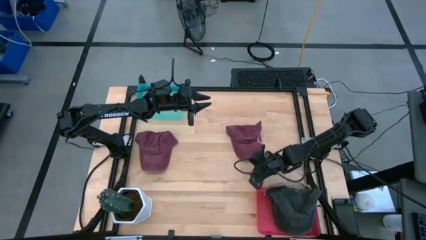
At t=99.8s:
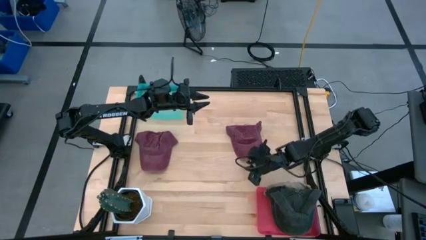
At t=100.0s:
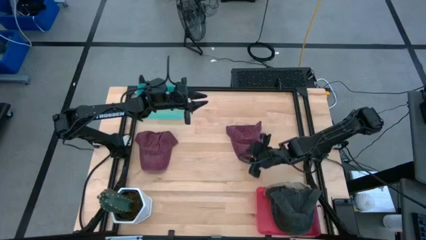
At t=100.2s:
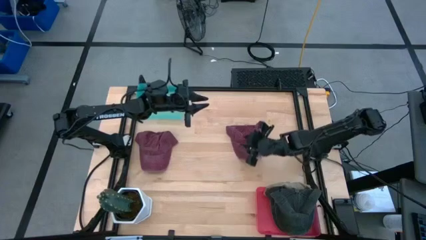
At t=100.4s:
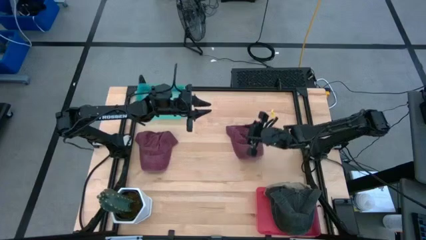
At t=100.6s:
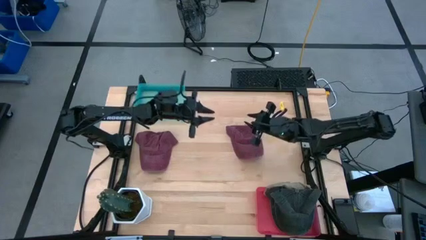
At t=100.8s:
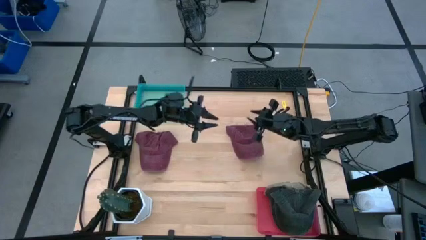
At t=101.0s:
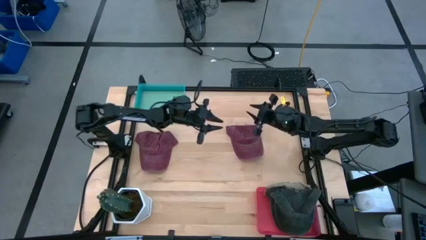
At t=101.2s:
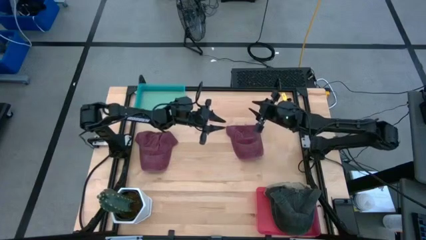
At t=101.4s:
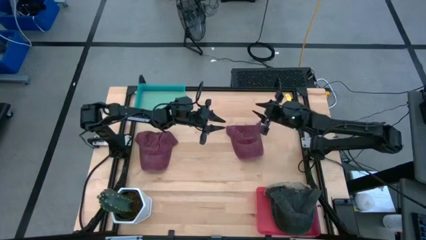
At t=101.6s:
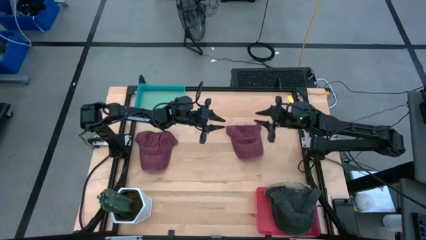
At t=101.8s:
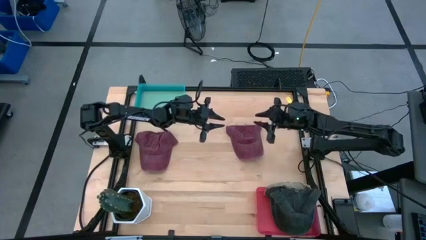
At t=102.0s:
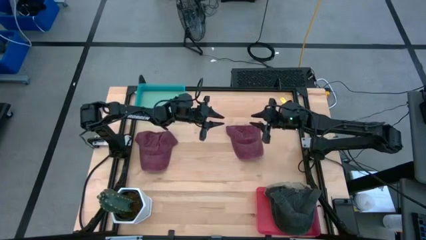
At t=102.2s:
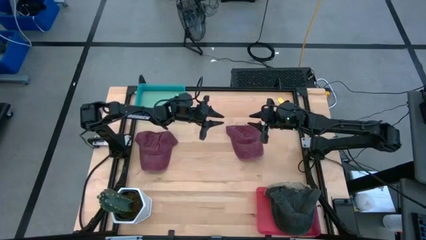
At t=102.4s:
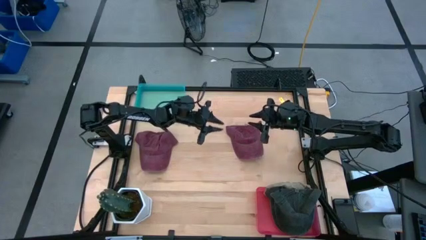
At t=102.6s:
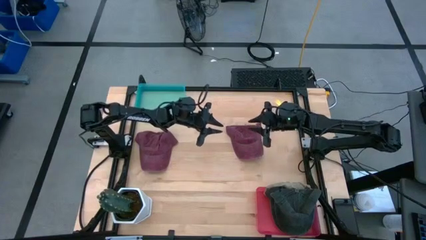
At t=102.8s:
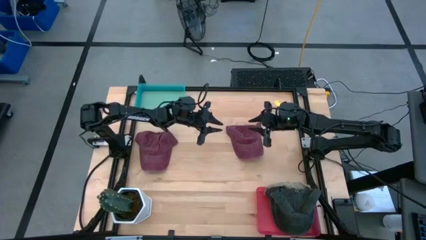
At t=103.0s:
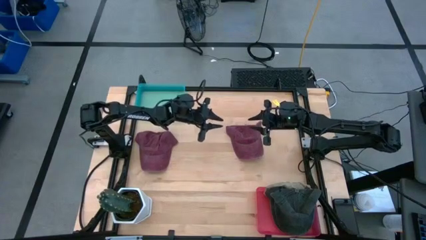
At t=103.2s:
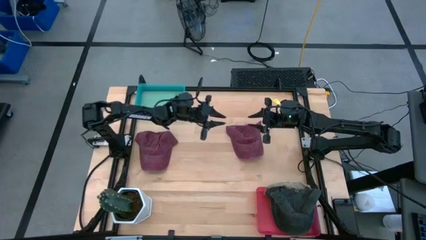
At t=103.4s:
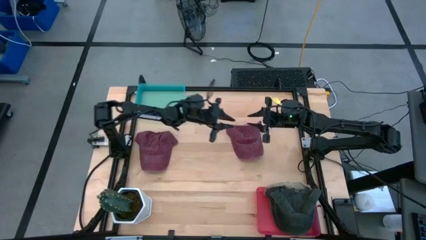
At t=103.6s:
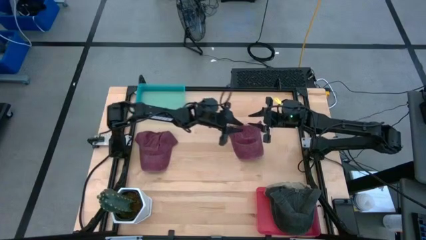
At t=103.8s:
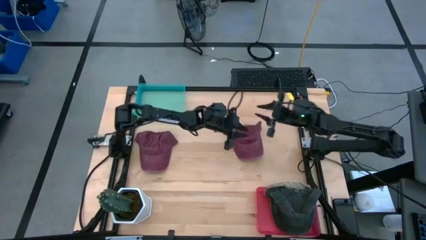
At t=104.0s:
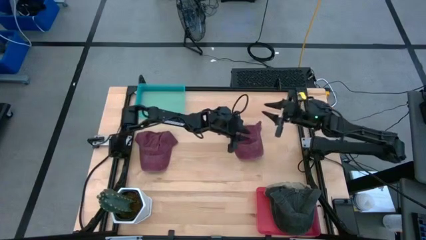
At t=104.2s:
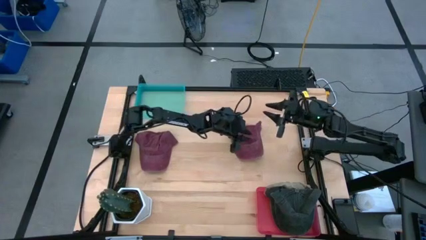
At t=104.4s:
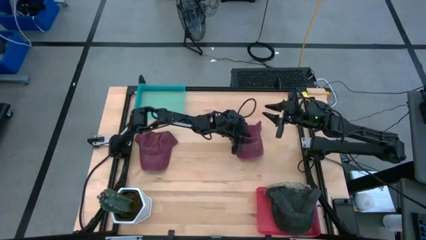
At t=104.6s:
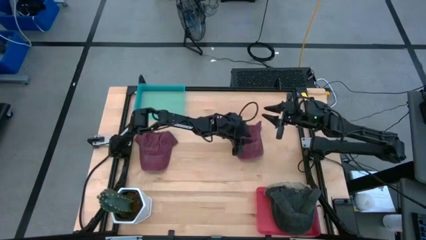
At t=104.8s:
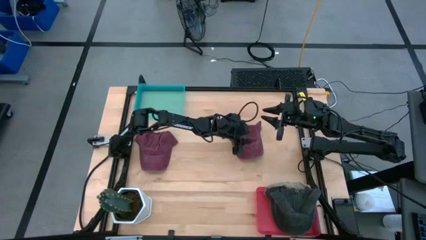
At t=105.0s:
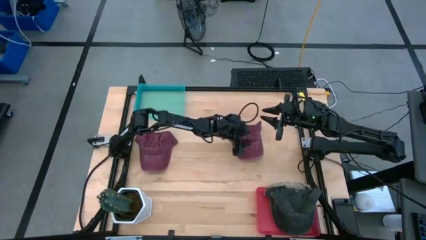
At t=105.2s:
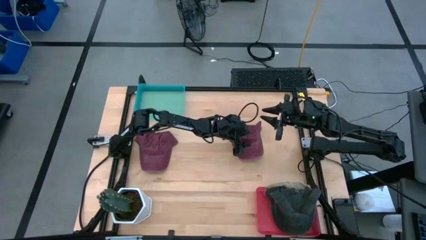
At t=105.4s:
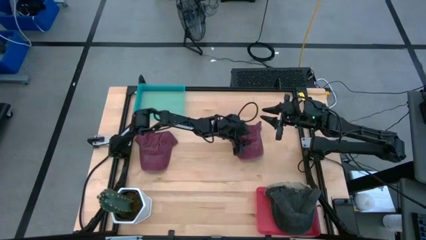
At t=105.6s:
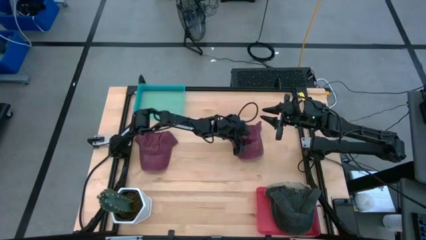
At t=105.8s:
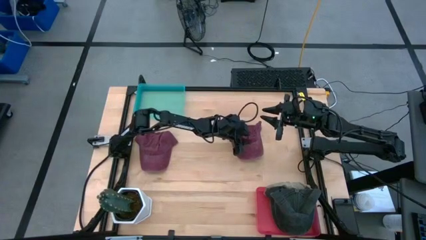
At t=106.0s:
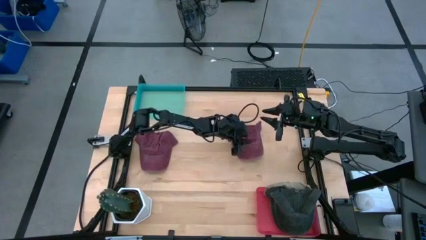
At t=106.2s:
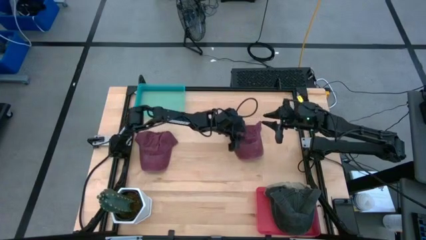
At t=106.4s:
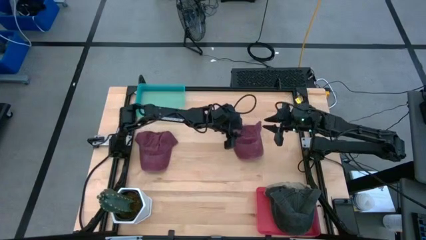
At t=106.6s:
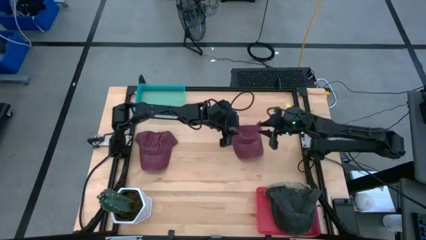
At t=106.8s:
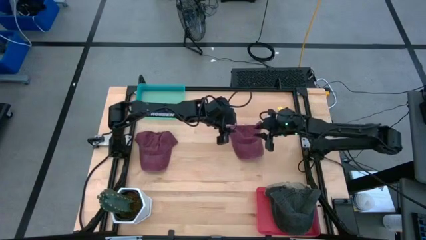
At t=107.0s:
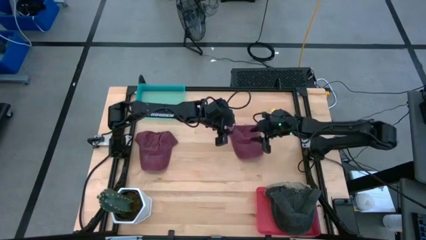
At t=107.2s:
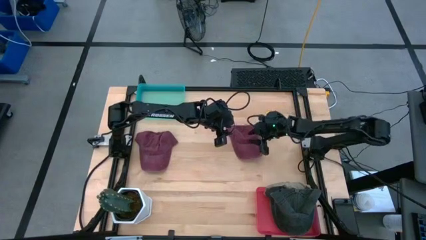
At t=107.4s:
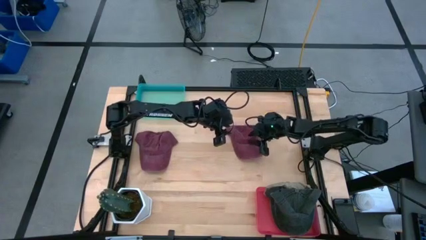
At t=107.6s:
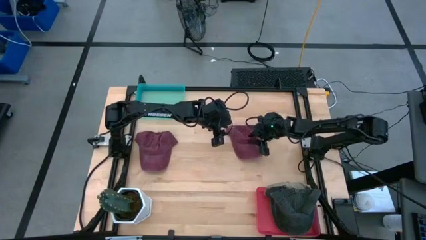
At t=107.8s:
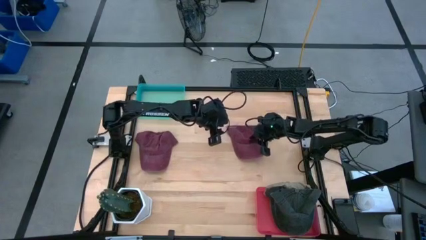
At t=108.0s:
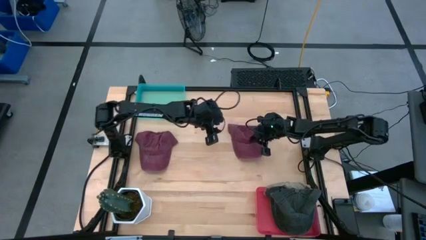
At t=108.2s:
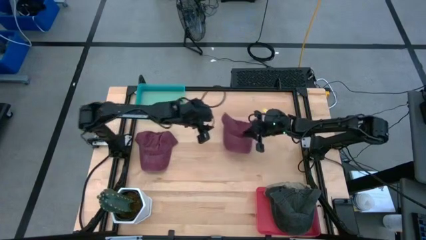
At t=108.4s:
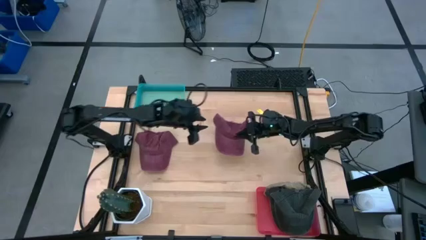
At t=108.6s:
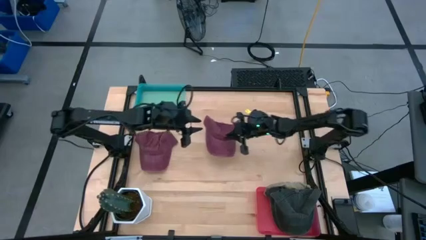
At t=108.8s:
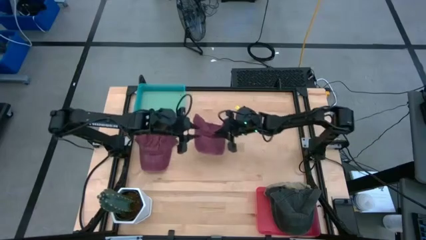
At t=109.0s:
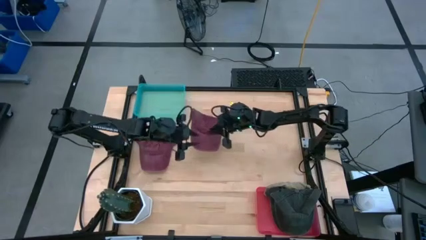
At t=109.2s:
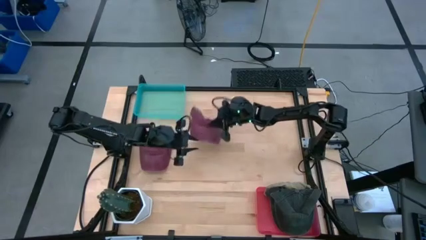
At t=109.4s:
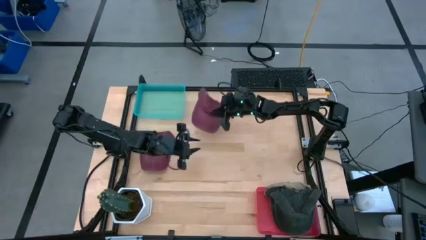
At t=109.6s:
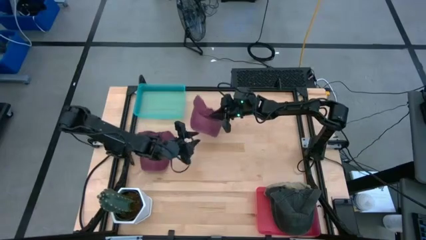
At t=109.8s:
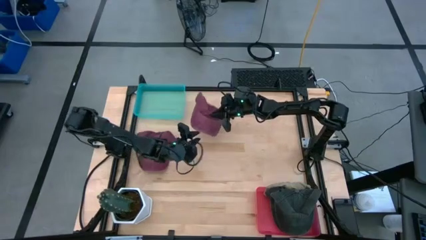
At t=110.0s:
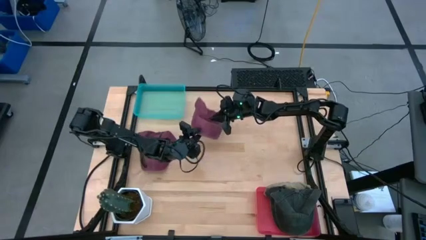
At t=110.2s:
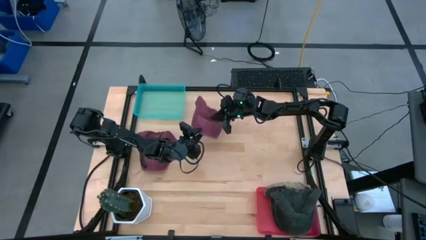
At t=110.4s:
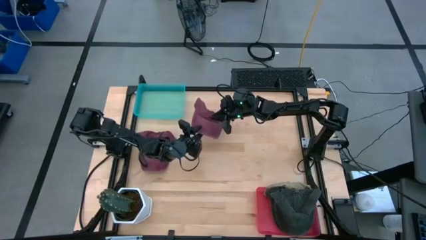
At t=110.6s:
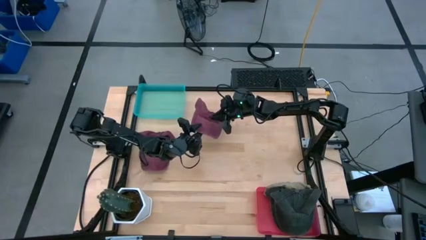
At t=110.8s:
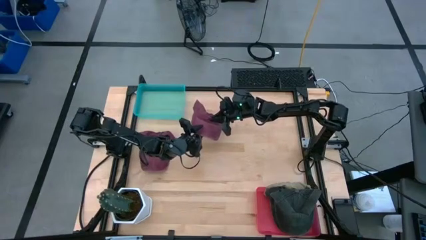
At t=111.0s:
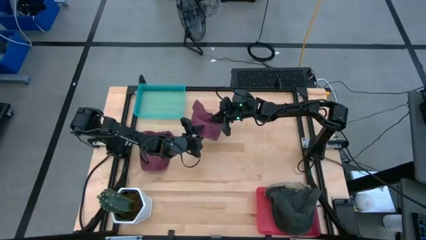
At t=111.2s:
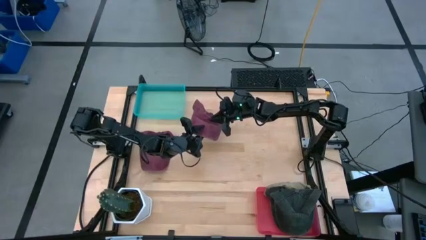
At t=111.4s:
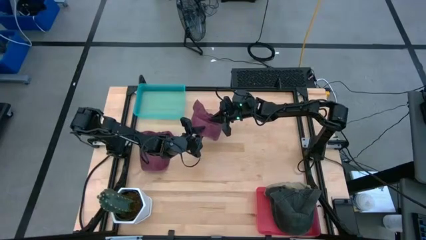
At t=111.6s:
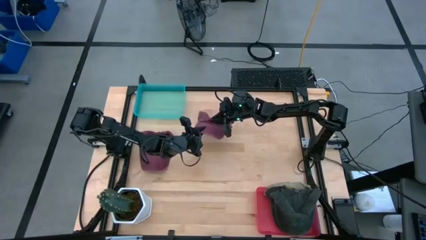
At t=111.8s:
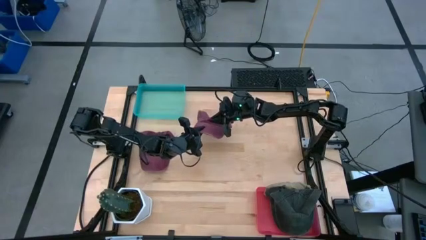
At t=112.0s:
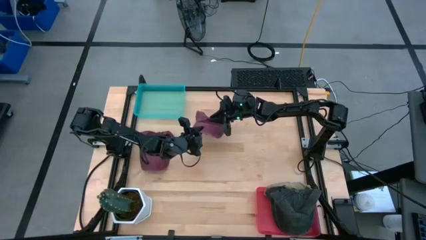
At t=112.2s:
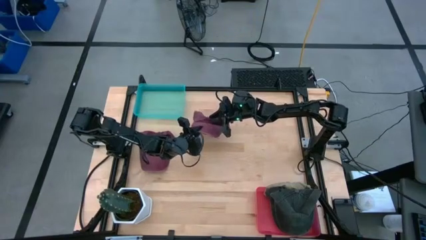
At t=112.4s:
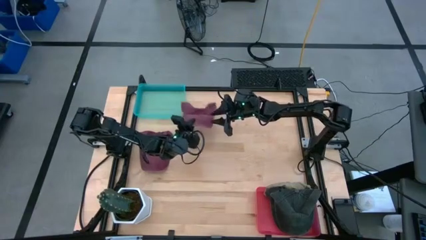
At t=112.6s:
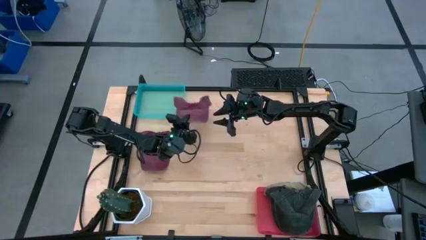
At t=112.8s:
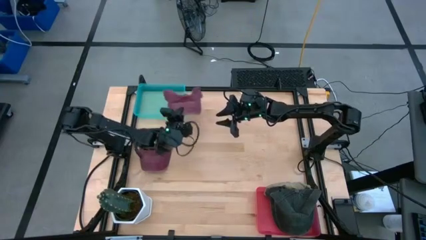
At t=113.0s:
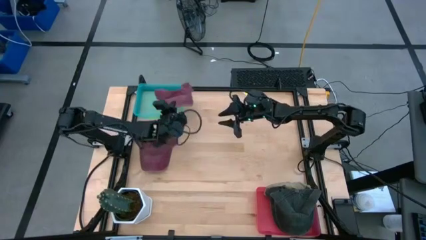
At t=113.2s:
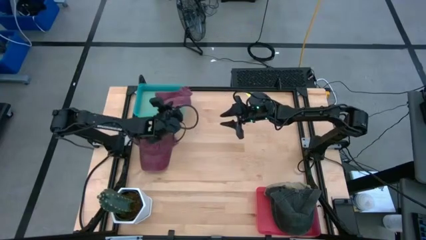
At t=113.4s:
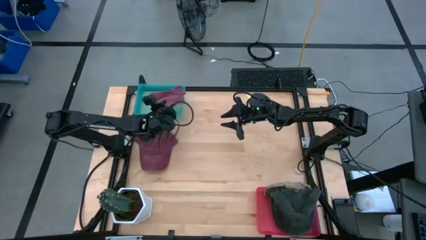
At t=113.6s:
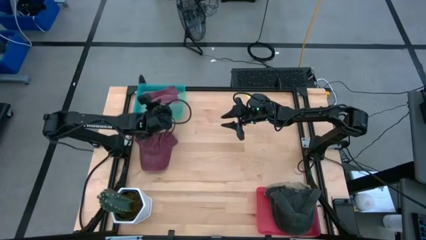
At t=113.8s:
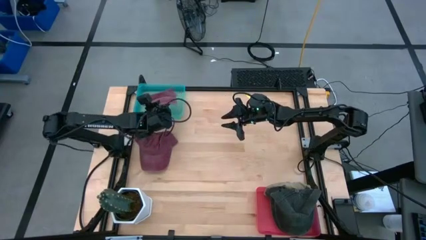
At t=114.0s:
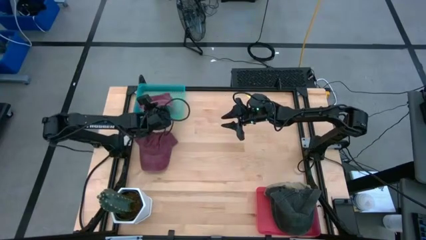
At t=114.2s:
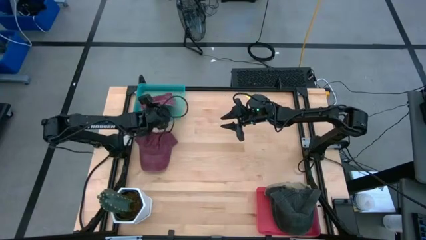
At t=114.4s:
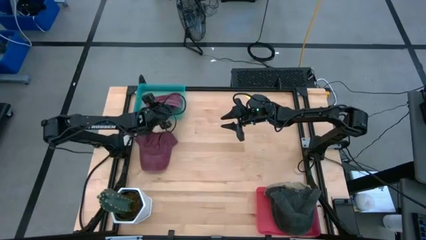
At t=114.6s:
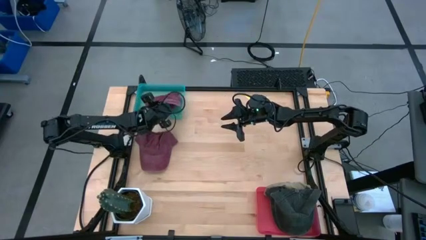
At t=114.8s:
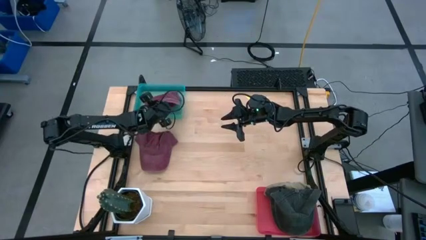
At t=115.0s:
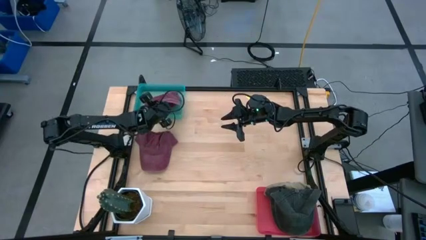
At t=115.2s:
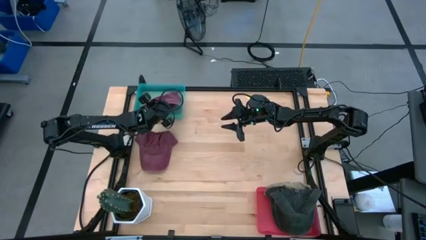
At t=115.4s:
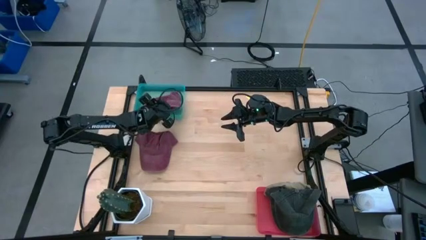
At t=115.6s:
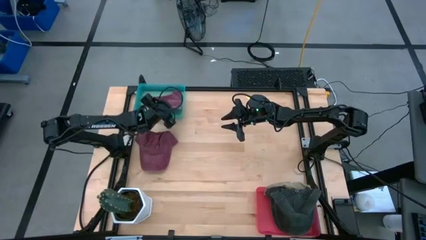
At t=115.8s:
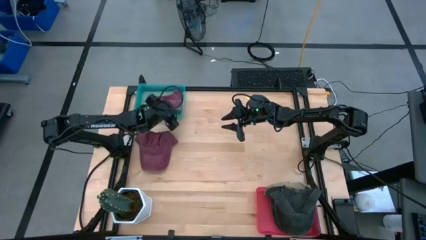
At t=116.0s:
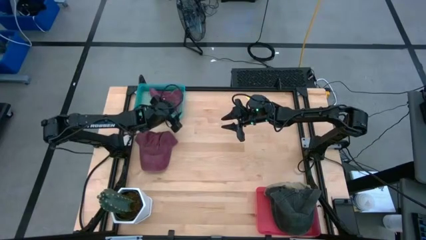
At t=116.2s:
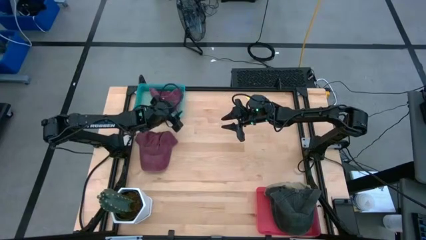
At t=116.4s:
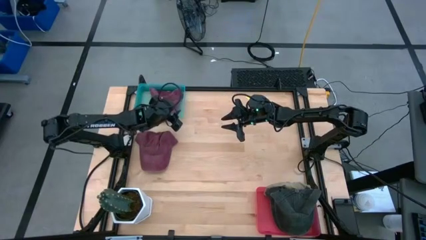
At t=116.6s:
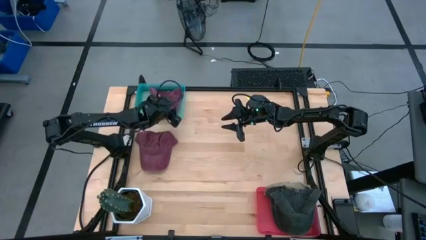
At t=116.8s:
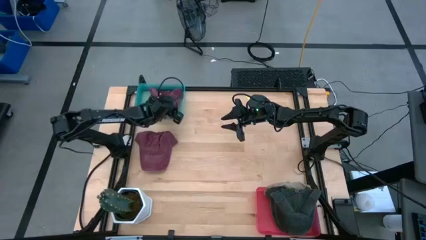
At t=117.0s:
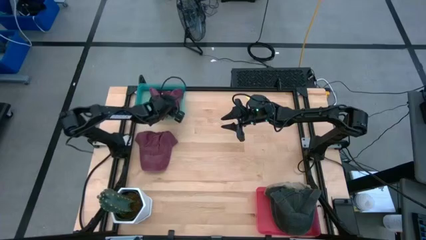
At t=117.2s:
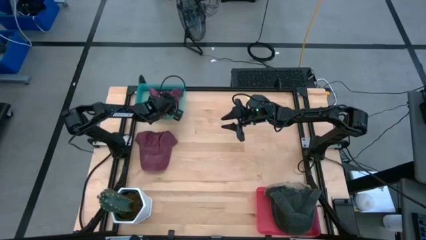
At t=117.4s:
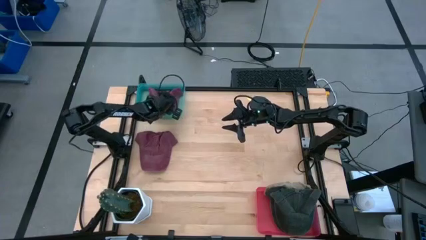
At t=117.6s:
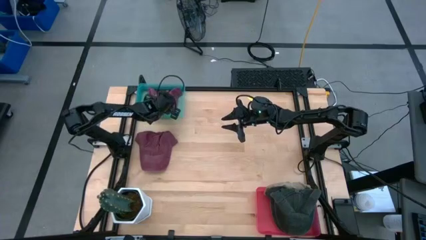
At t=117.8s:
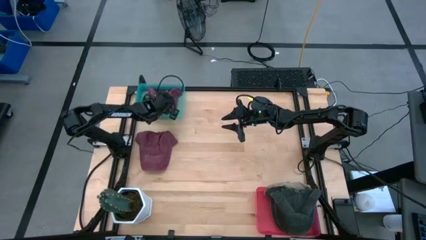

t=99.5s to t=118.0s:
Task: Pick & Place hat
Put the right red cap into the blue bin
